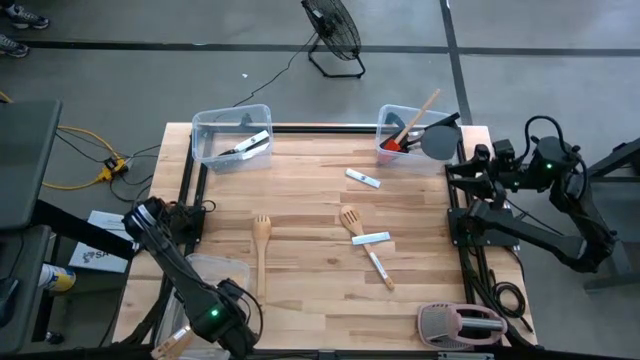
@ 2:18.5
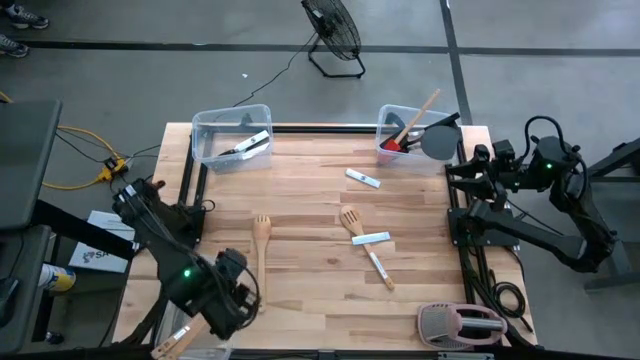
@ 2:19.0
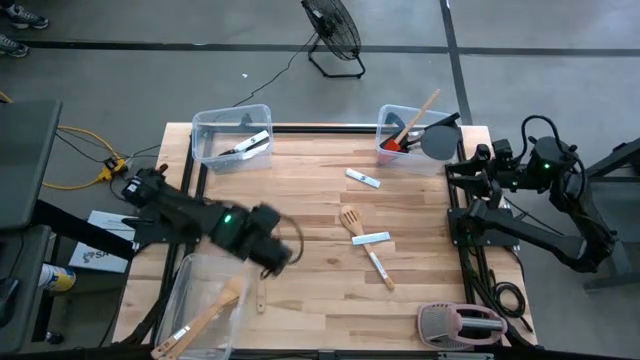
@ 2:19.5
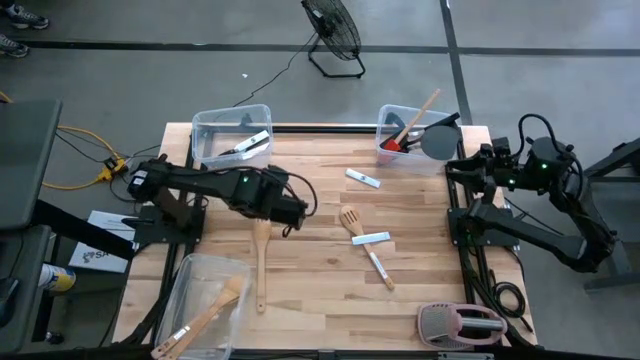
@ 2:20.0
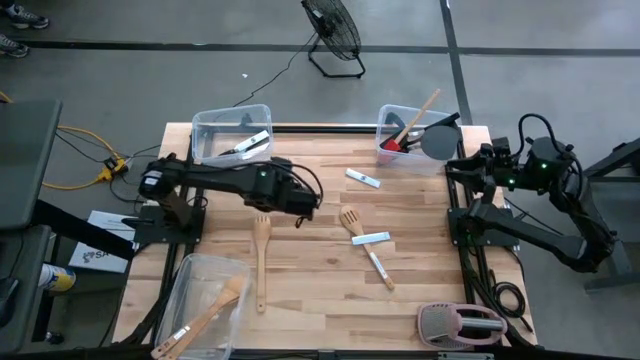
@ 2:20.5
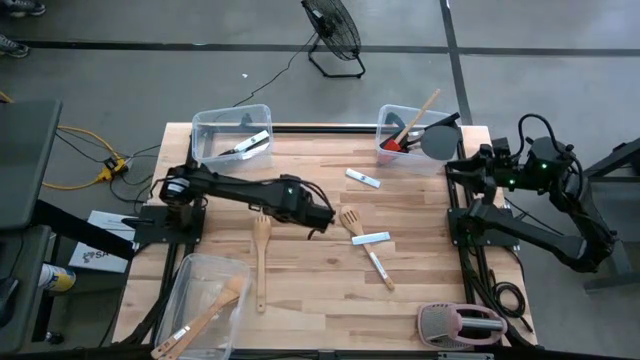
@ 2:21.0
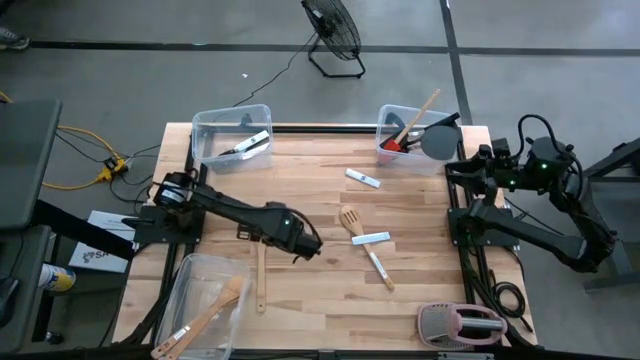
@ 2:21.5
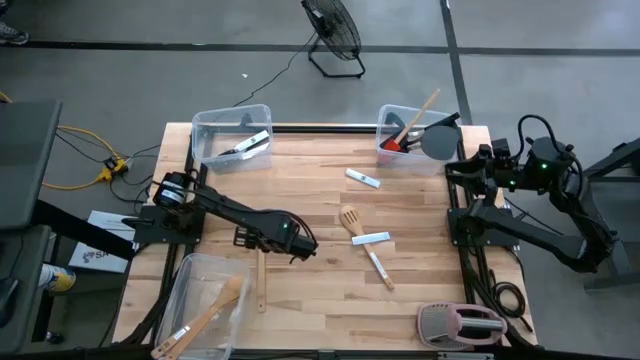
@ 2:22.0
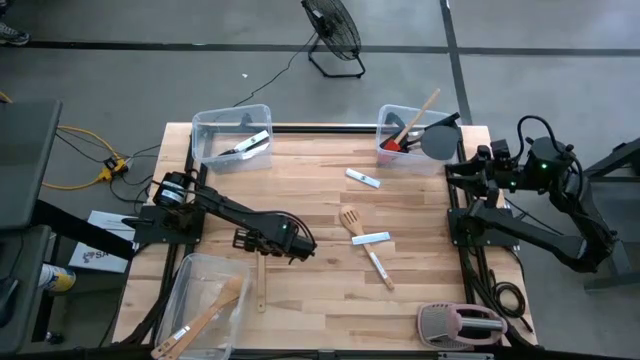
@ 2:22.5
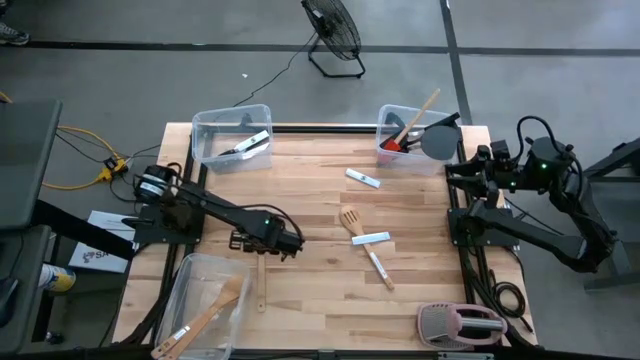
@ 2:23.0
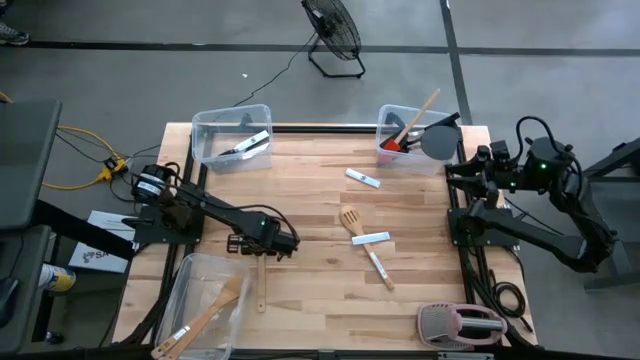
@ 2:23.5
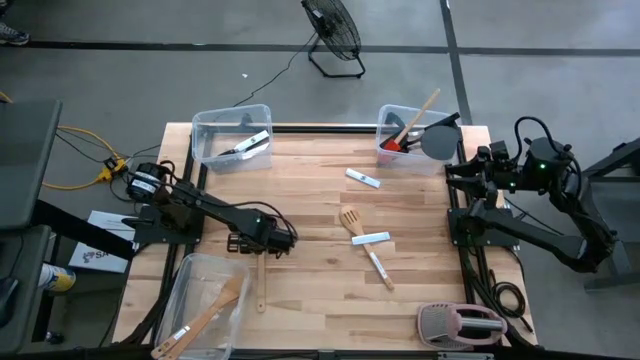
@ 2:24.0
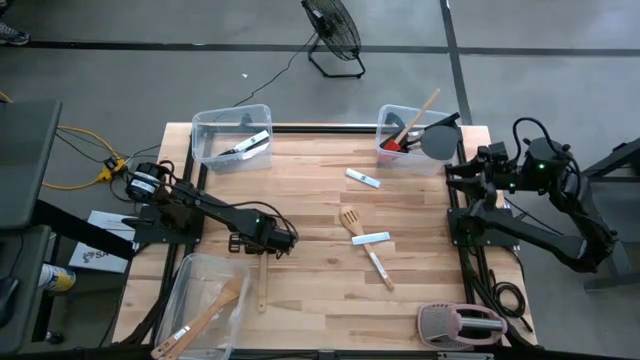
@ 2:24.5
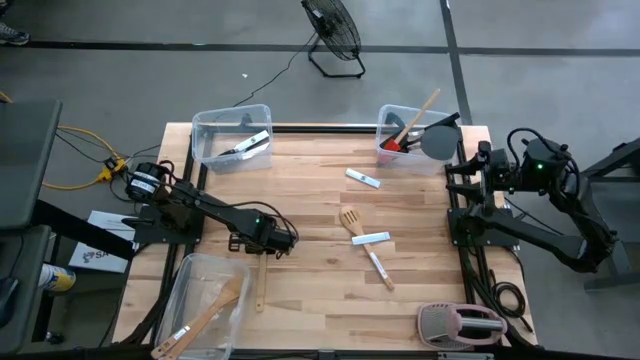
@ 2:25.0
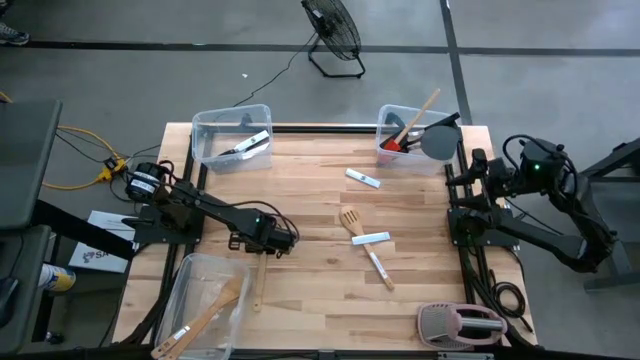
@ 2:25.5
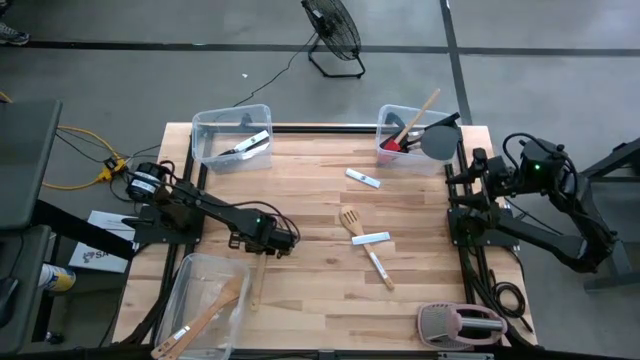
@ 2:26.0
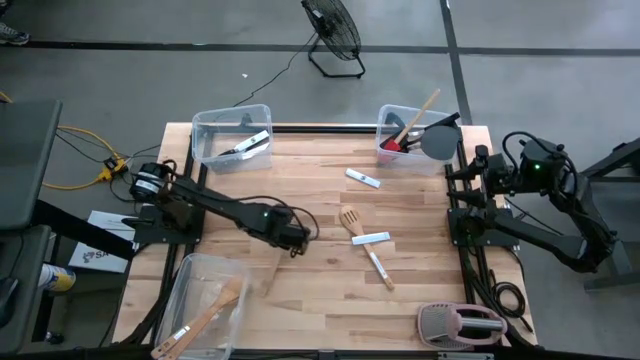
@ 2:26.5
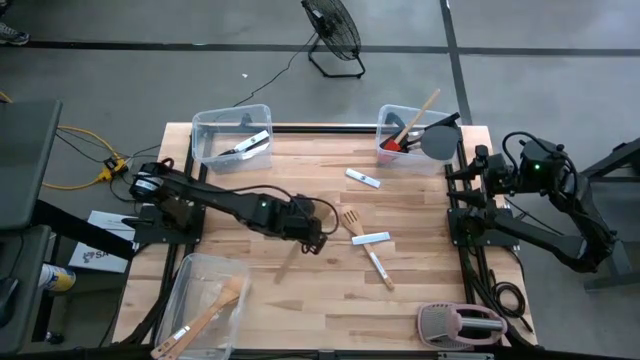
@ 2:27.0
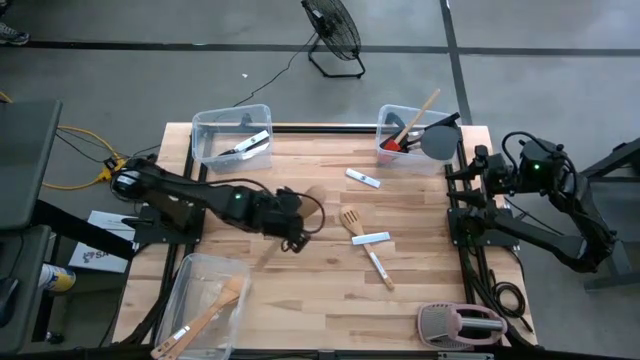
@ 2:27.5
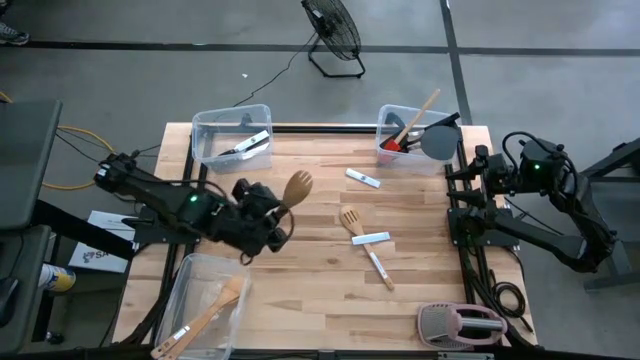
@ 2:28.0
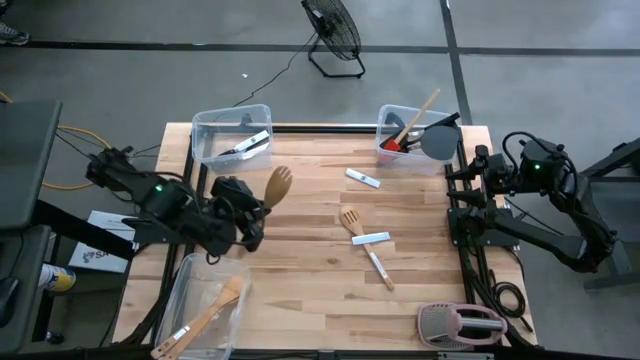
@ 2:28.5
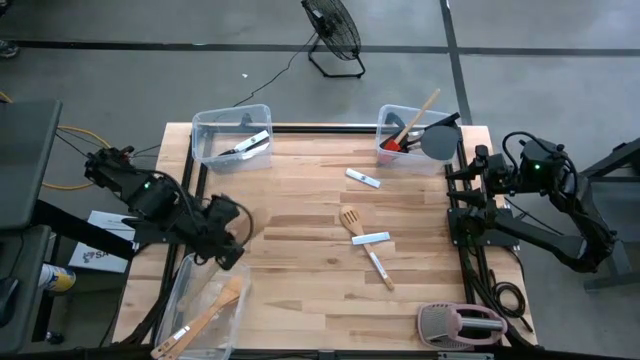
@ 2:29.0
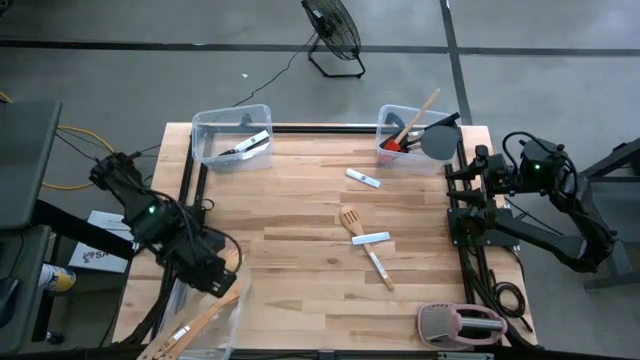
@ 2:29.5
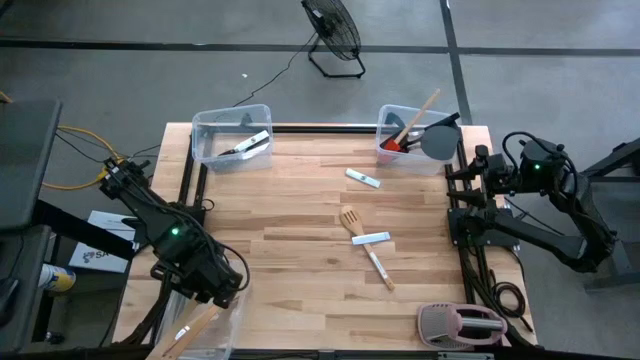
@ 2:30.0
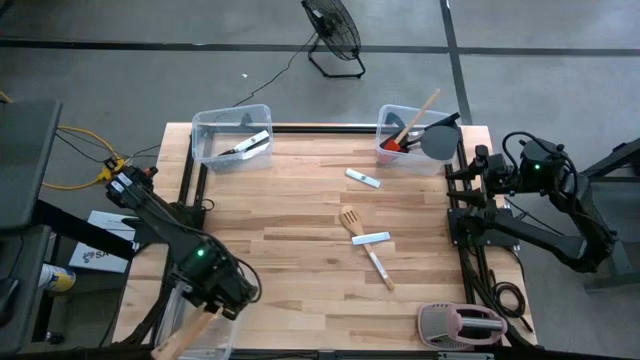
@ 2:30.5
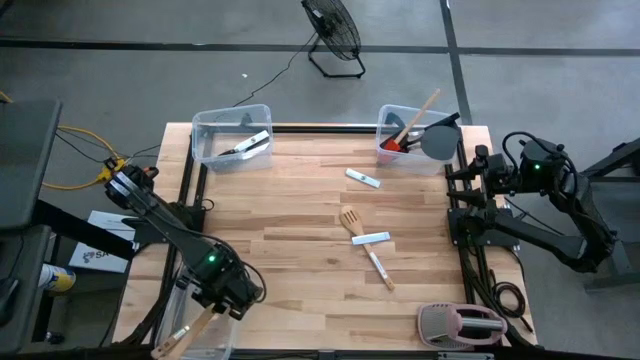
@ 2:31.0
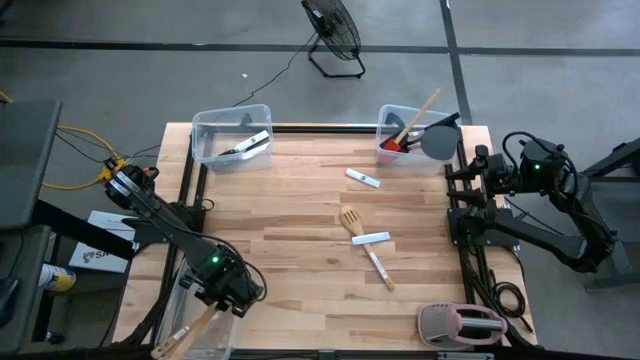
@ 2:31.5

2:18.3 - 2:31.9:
Task: Pick & Place Kitchen Items
Put the brown serving spoon into the bottom transparent bin

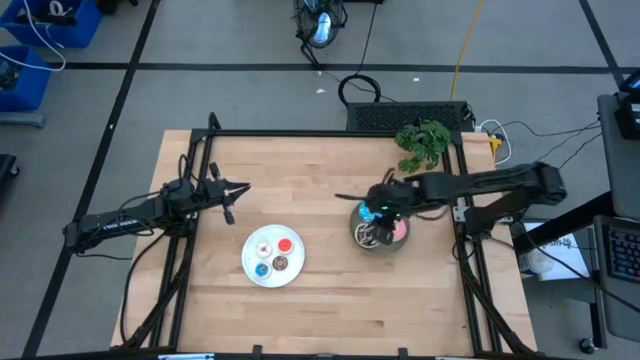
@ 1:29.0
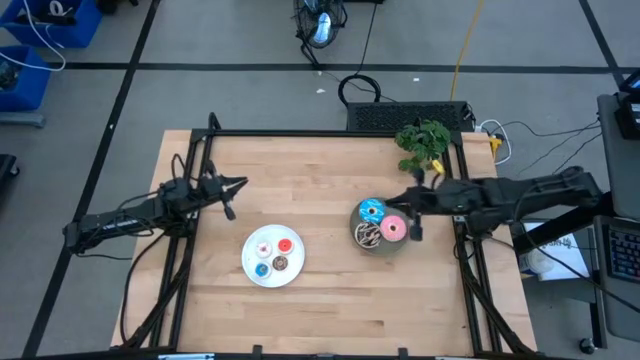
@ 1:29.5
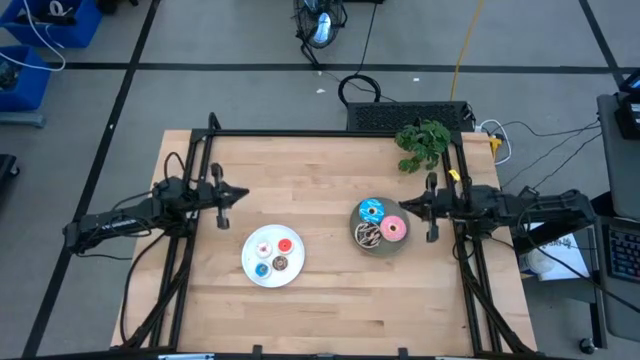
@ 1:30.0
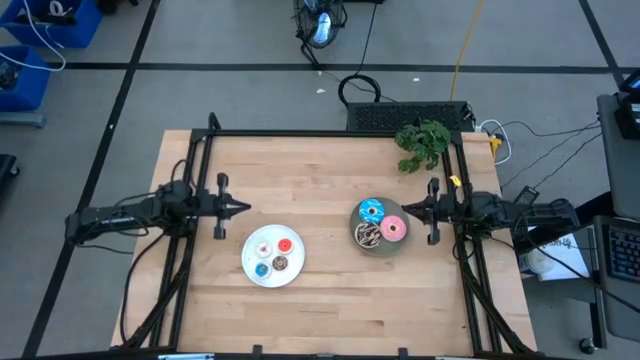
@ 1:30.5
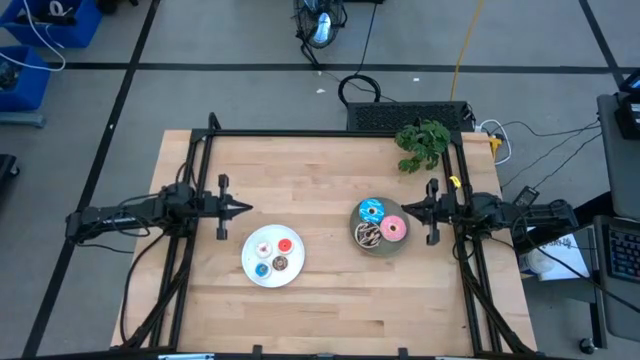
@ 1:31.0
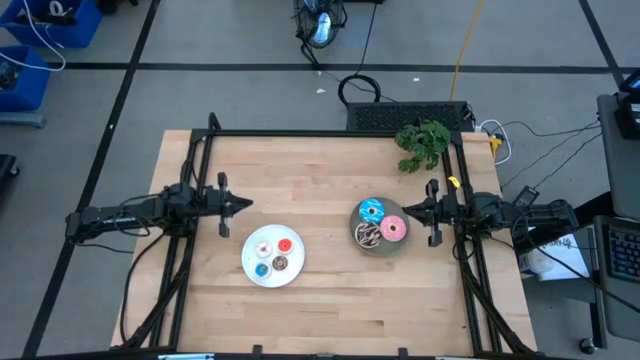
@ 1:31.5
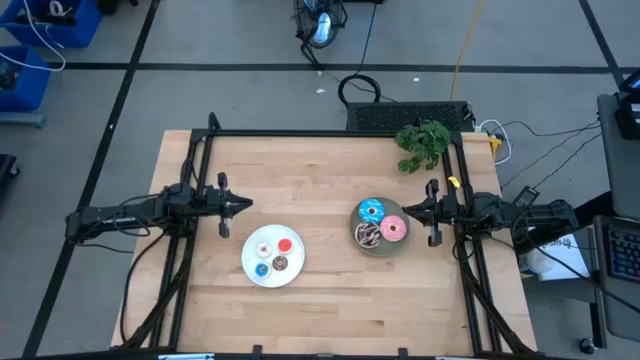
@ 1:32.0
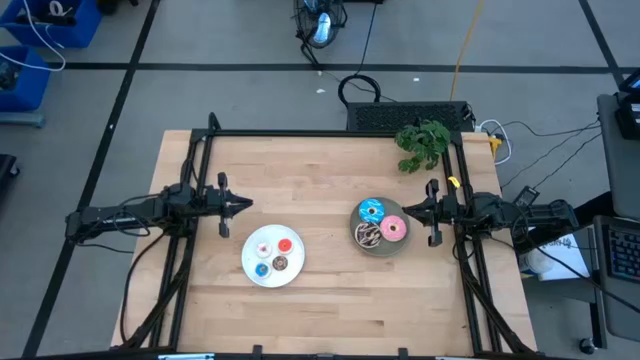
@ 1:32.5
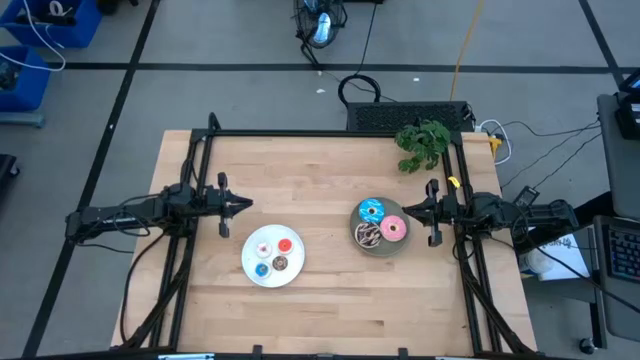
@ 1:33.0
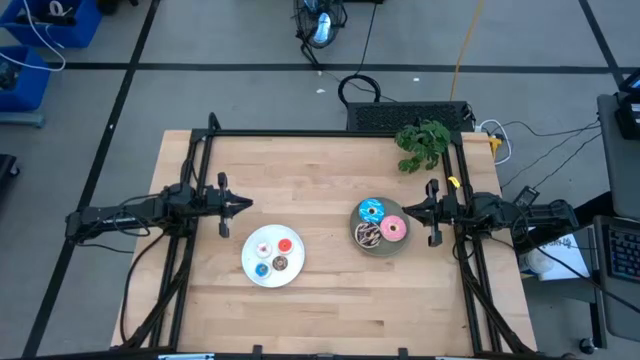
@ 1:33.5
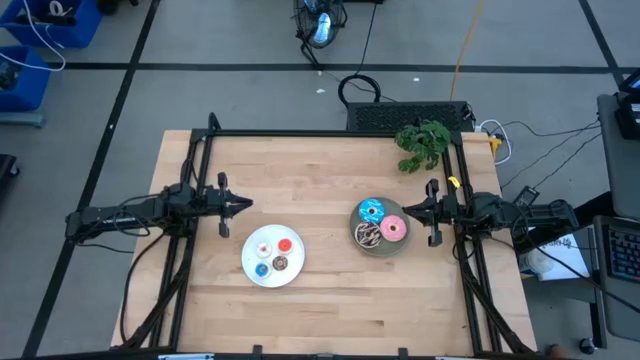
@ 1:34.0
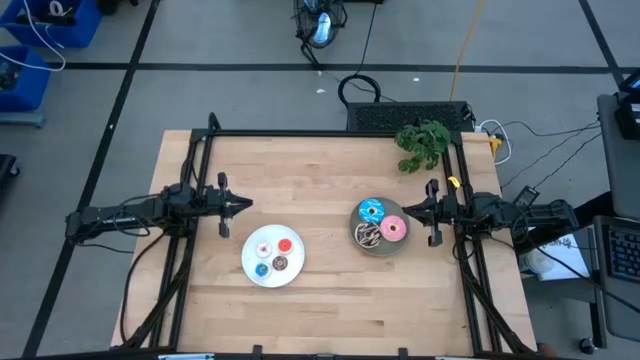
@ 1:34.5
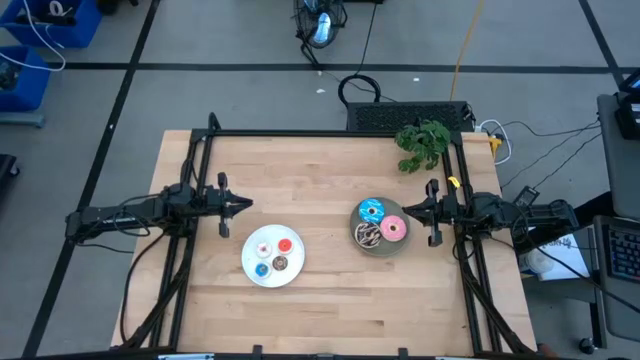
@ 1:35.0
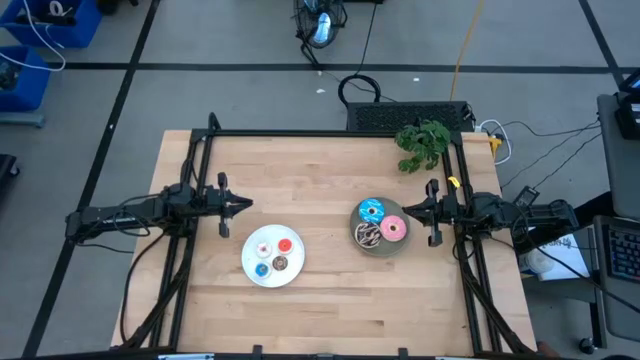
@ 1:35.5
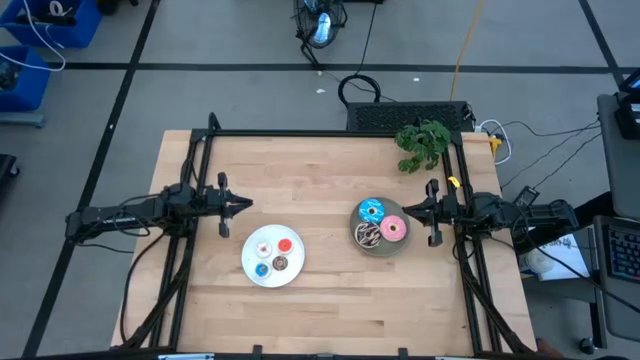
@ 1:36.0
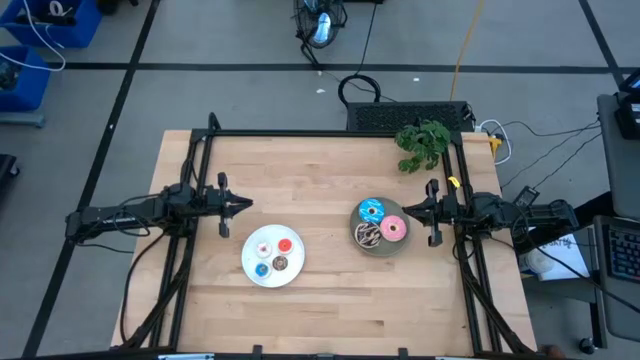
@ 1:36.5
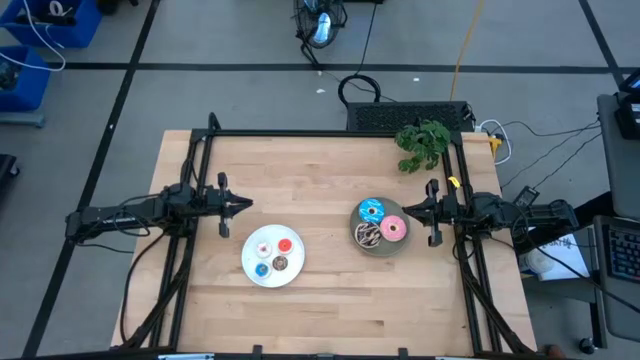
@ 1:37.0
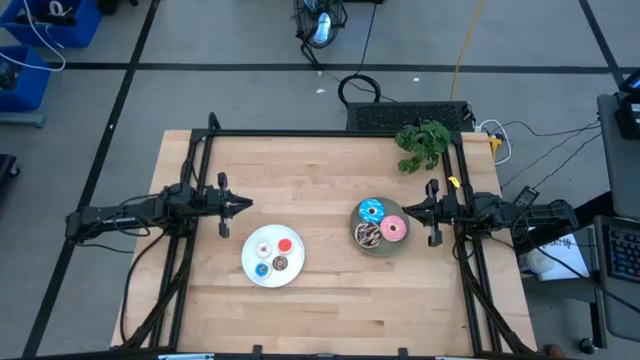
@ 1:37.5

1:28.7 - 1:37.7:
Task: Pick & Place donuts
Return to Home Position
